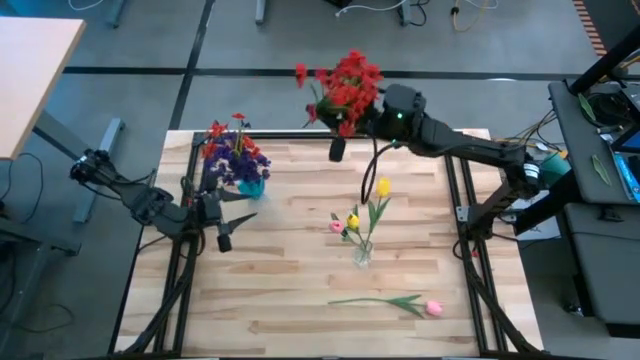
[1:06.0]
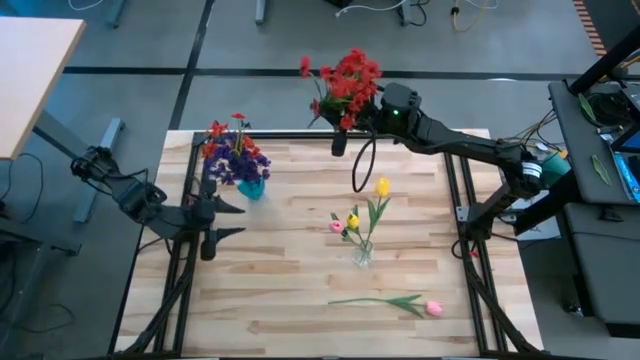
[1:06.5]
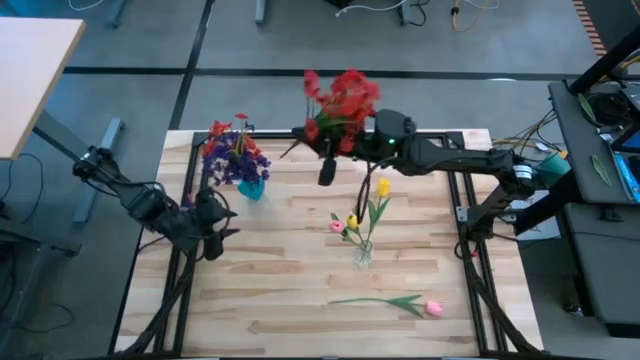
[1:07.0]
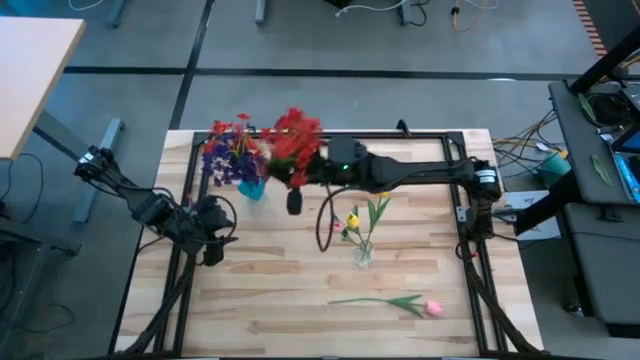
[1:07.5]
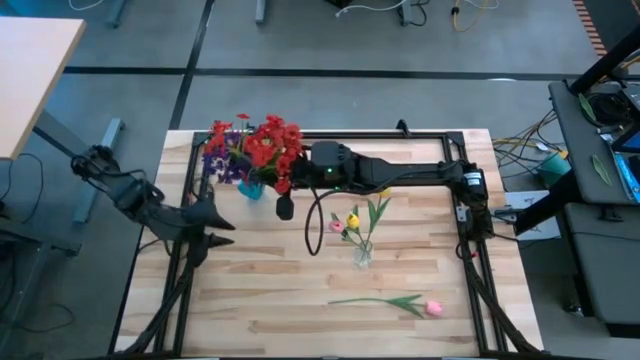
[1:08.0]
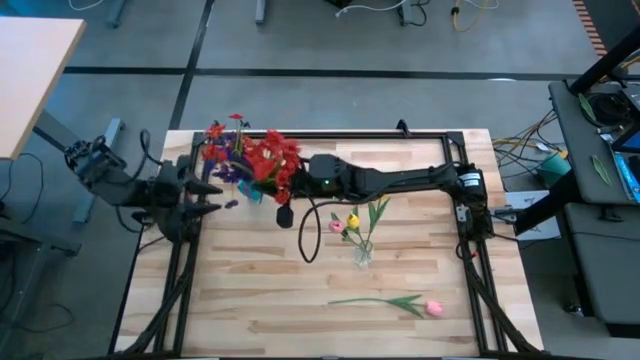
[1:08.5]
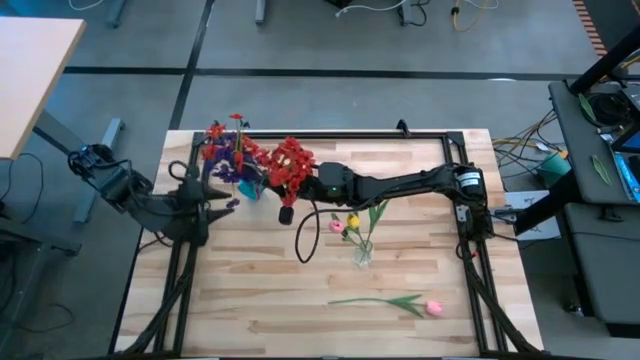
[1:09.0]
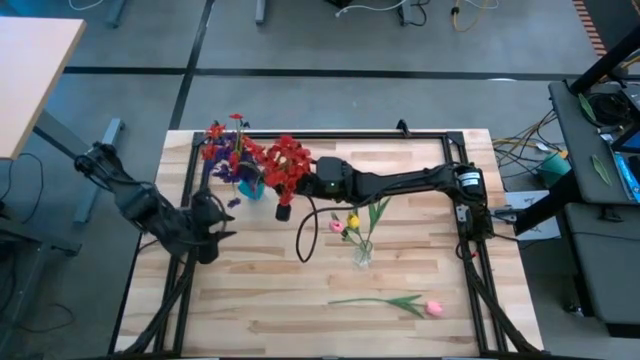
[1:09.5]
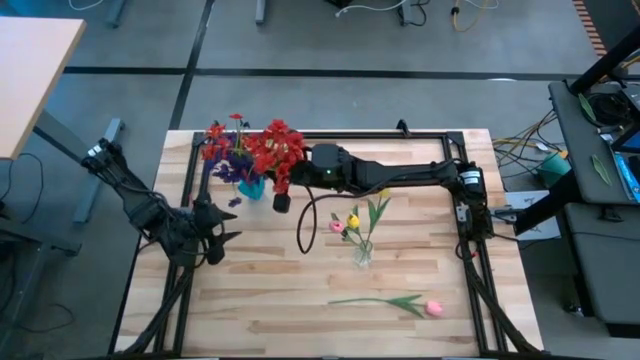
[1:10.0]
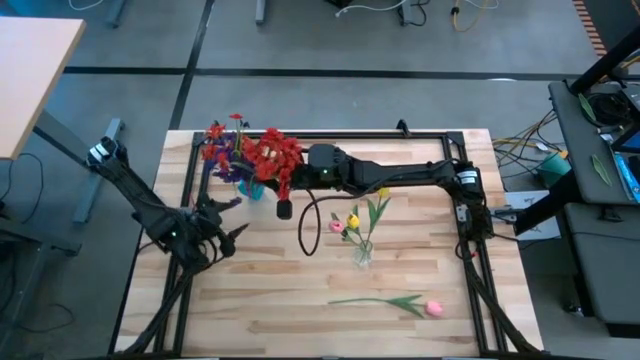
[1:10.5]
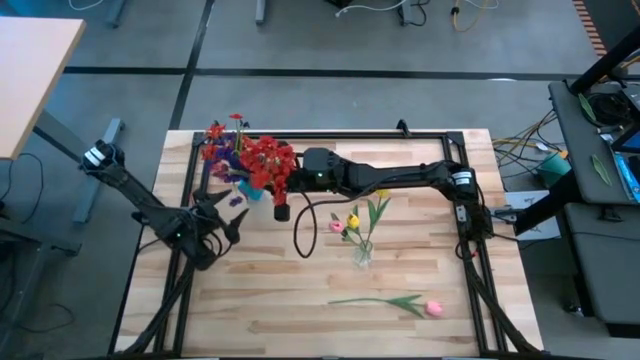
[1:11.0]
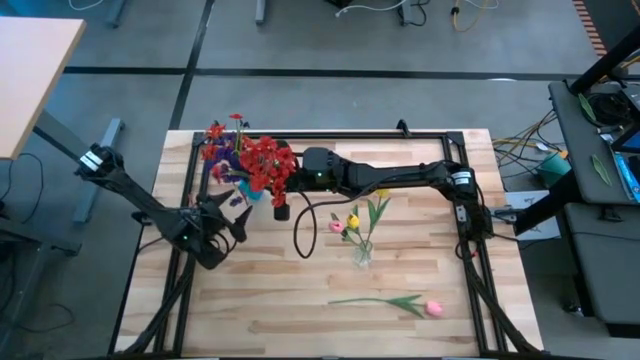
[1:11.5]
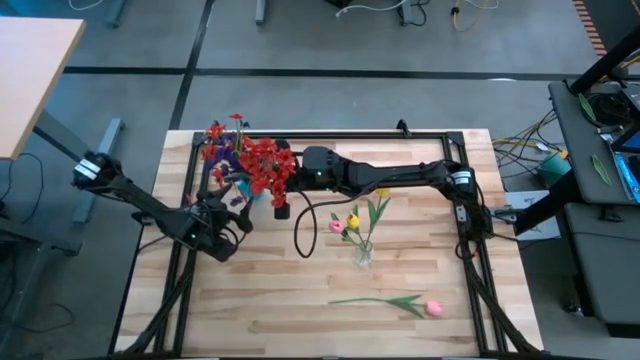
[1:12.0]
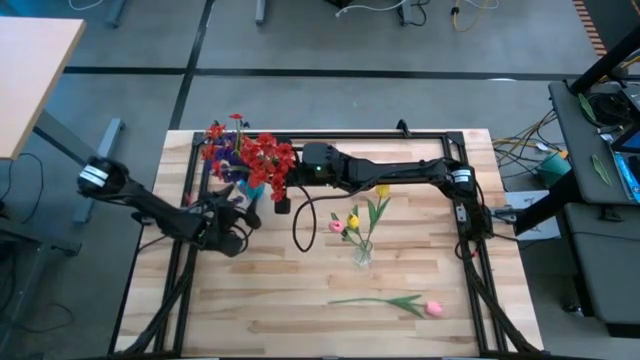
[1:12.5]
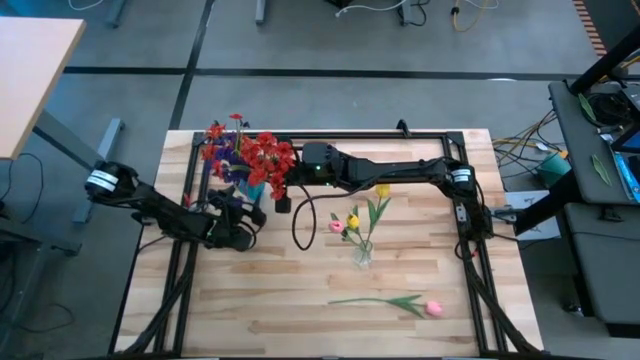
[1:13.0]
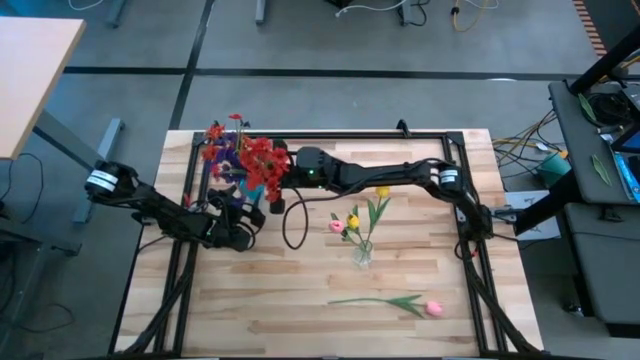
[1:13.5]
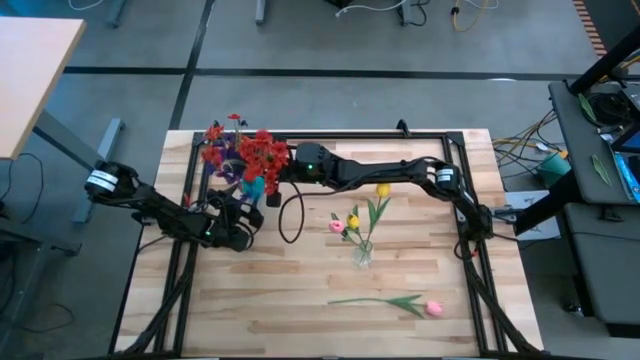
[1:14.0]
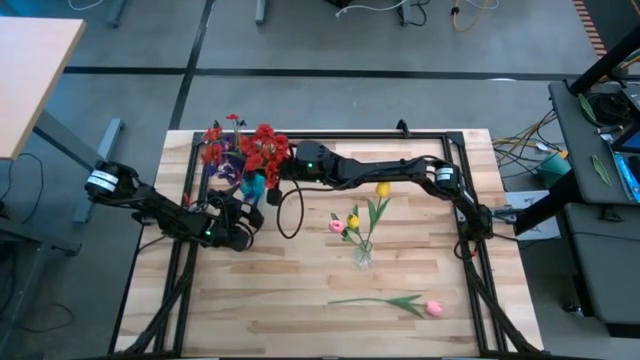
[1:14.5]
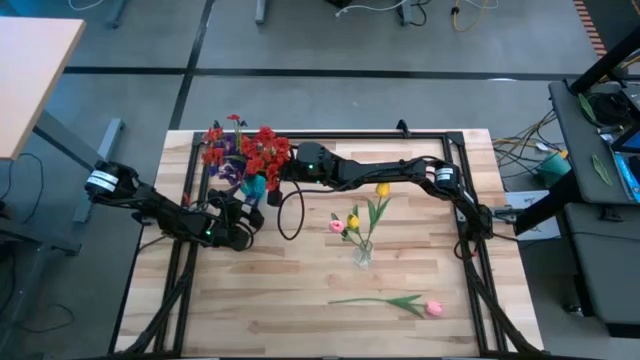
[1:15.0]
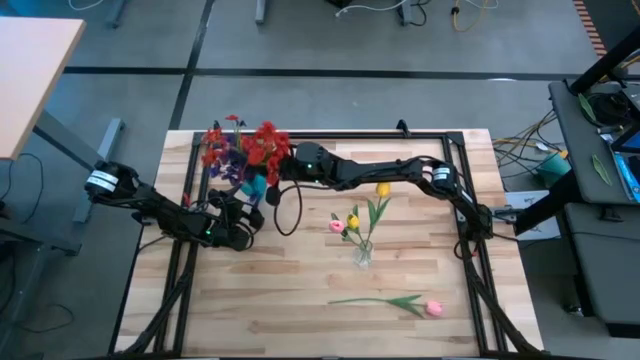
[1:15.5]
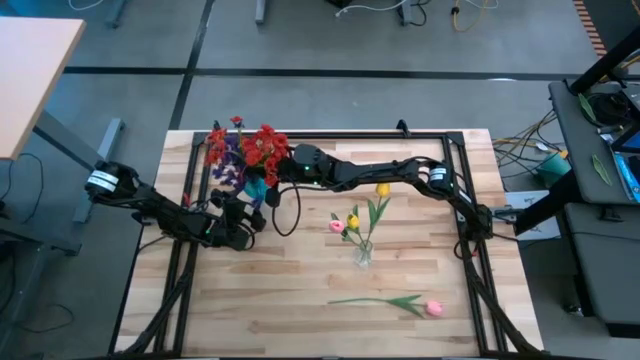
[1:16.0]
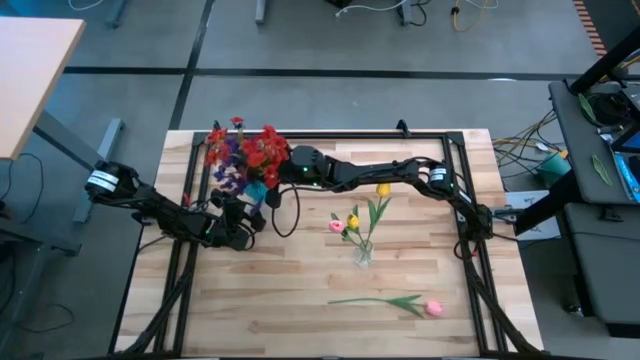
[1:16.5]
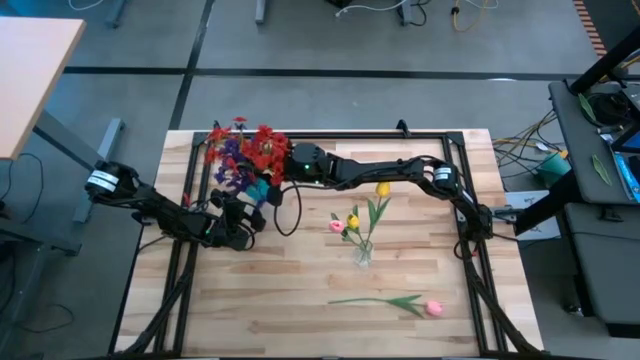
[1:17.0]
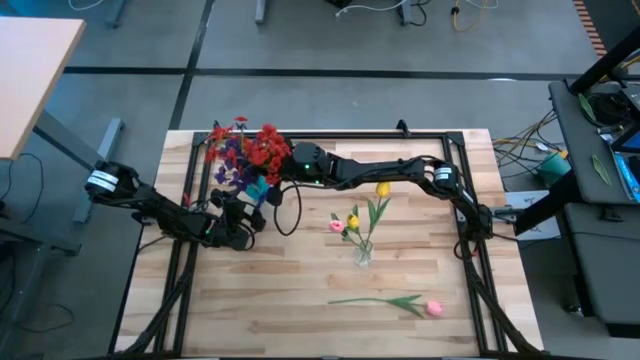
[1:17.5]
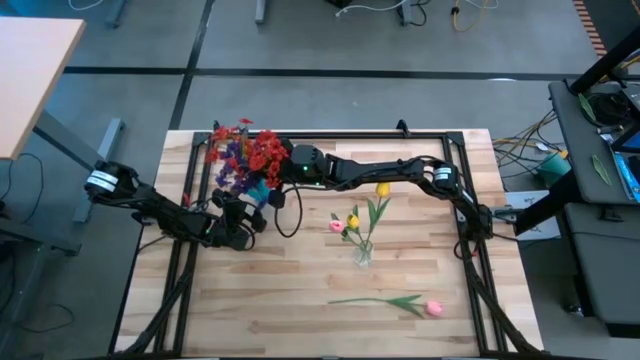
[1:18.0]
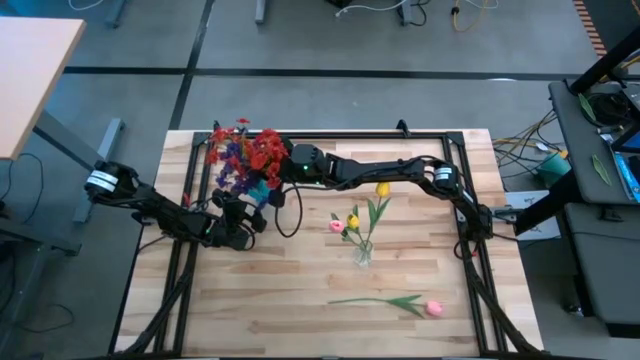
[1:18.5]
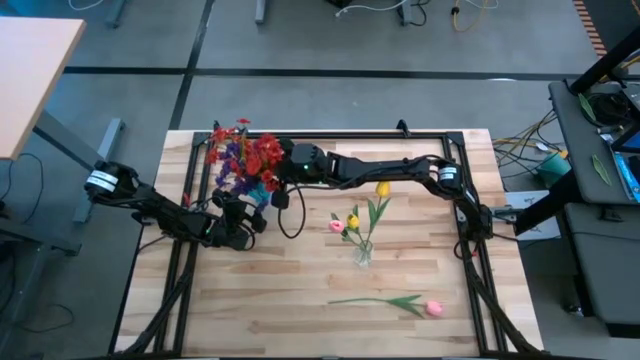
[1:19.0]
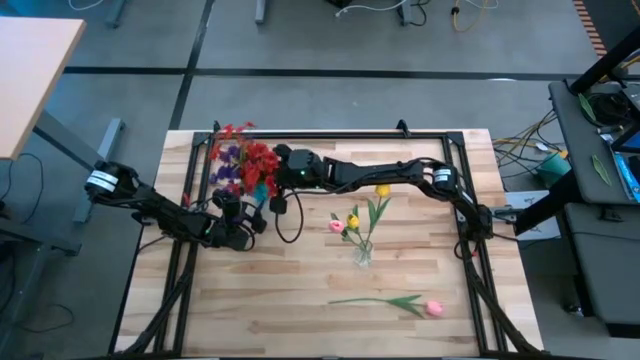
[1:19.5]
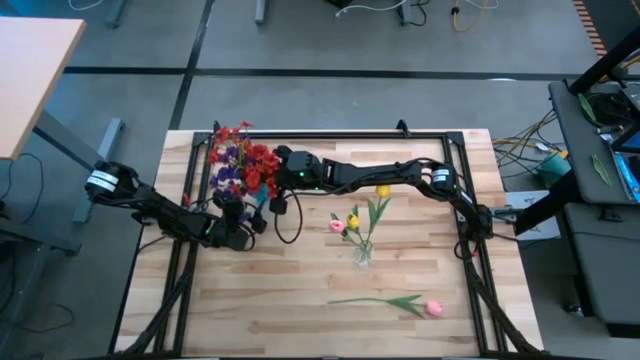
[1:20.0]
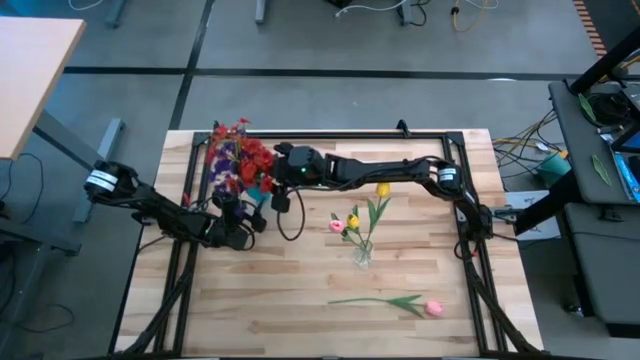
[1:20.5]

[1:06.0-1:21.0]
Task: Sort flowers into vase by color
Put the red flowers into the blue vase

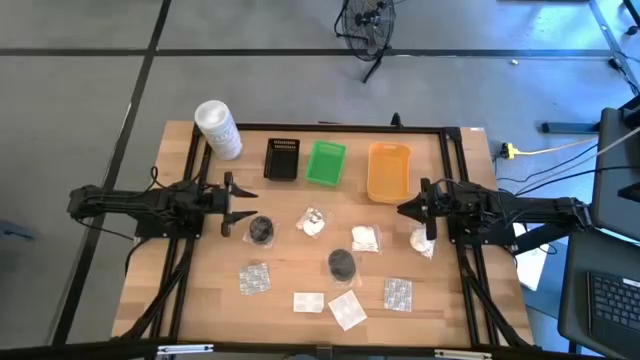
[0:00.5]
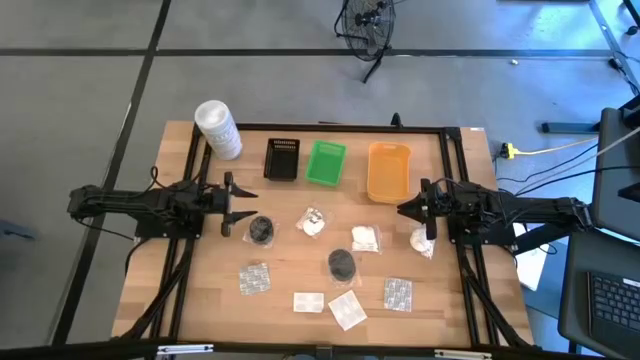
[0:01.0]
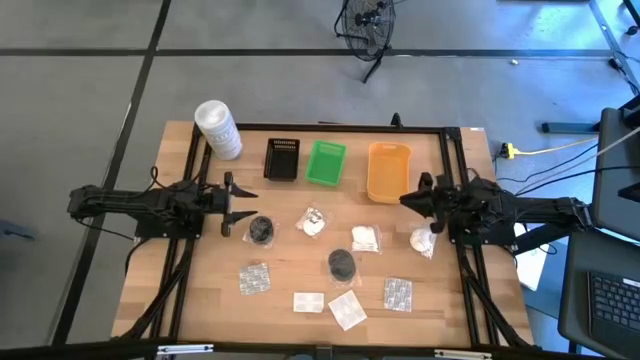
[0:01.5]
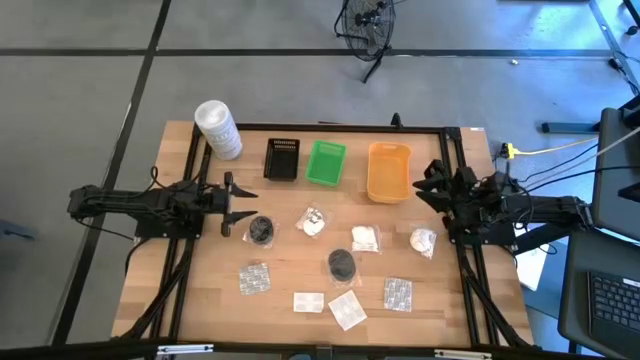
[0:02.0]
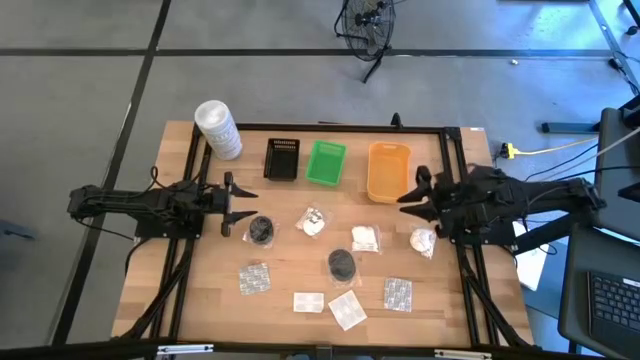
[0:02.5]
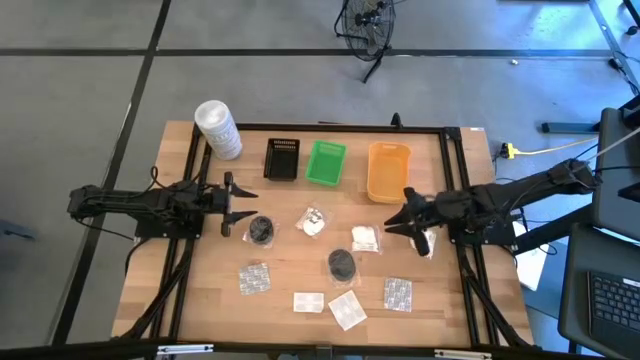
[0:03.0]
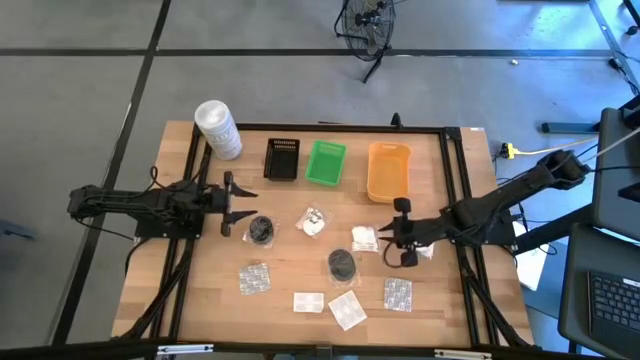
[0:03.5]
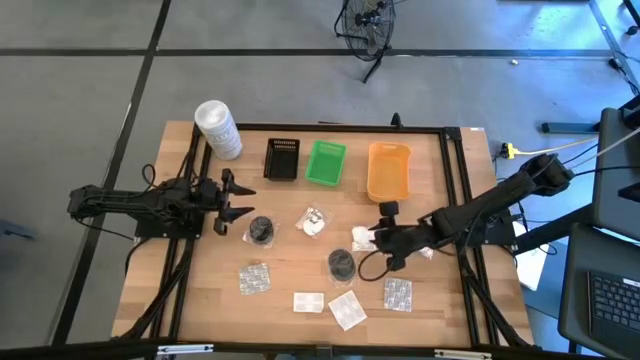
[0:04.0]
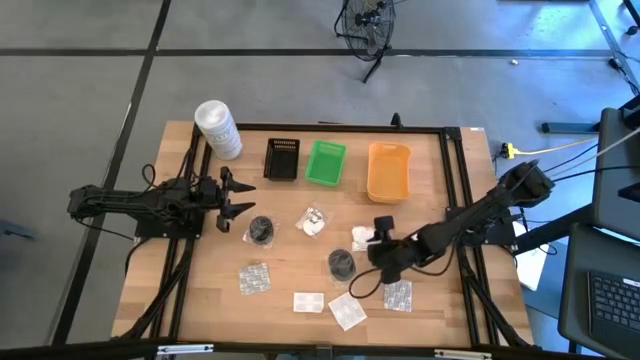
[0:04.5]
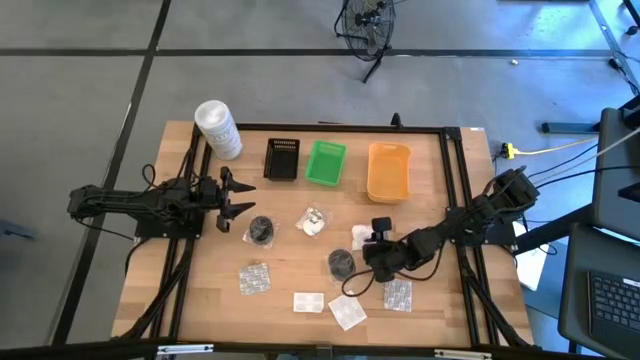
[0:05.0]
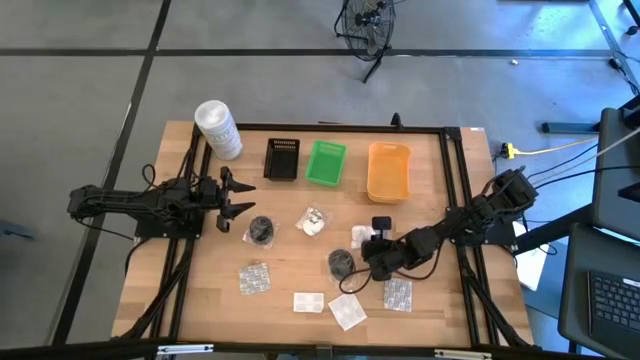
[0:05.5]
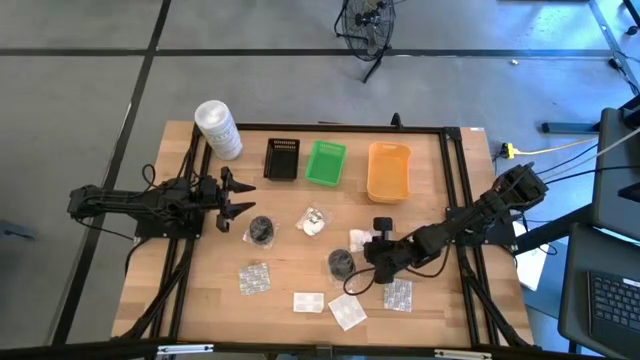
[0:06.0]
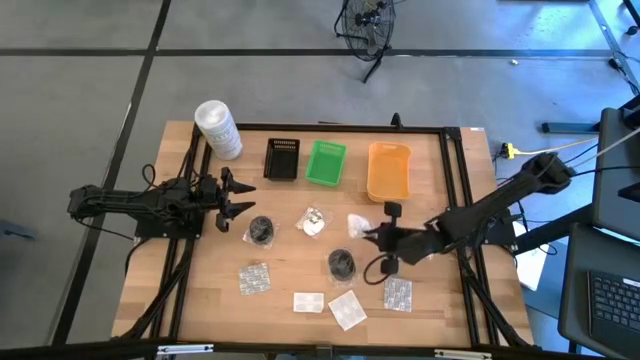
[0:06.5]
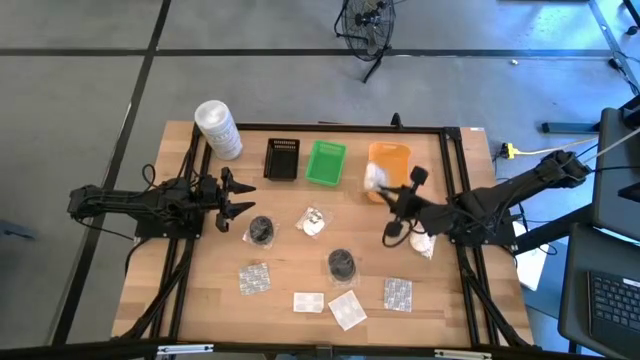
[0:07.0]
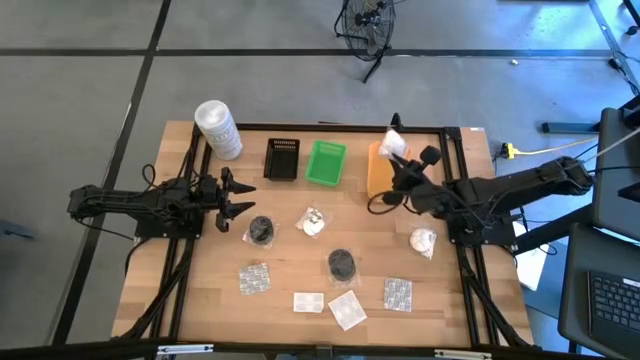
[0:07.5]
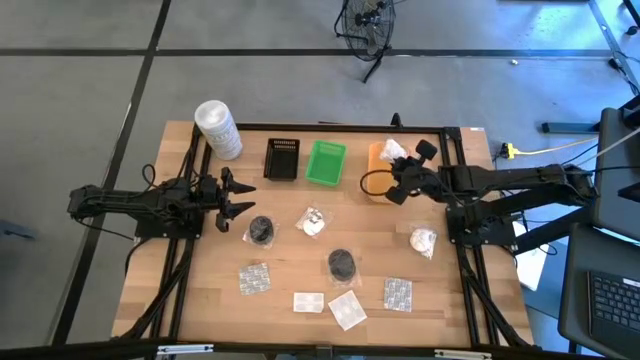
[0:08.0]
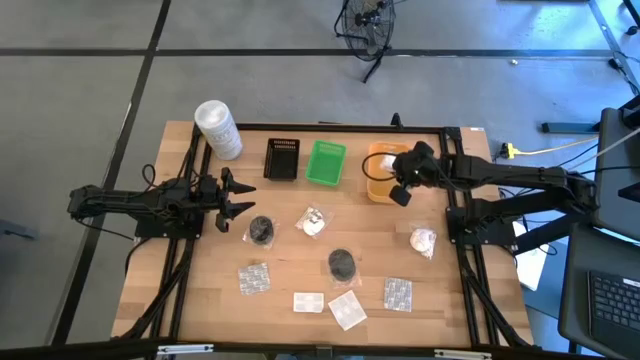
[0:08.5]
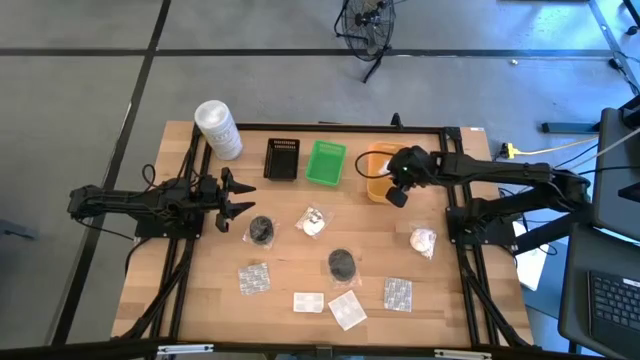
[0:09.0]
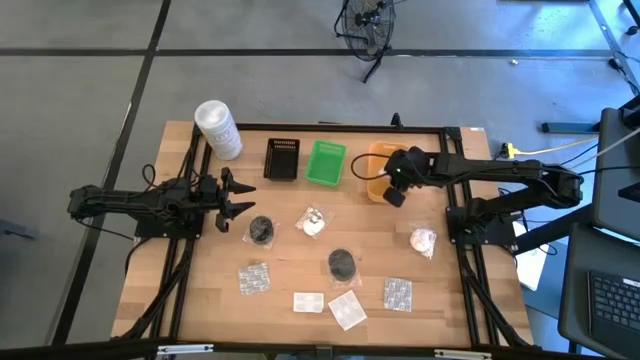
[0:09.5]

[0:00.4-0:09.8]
Task: Pick & Place Travel size toiletries
Put the white cotton pack into the yellow bin
